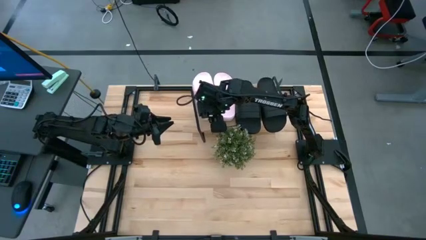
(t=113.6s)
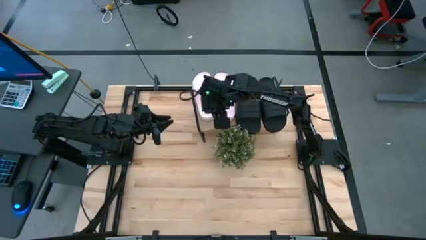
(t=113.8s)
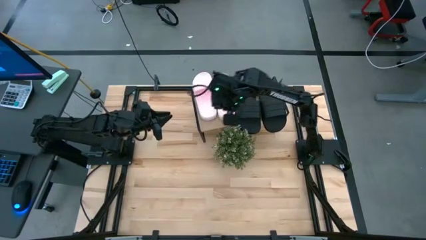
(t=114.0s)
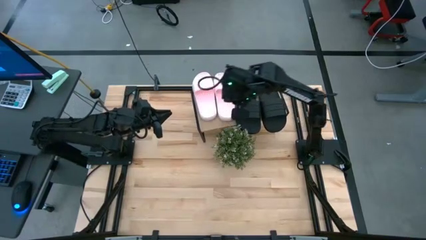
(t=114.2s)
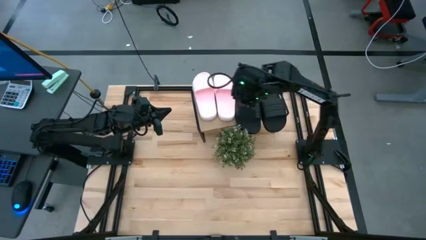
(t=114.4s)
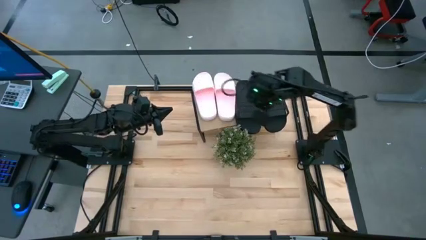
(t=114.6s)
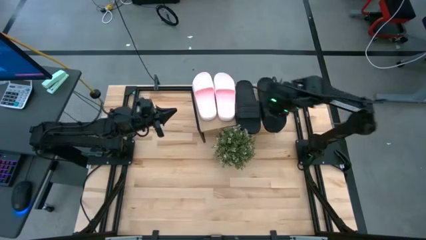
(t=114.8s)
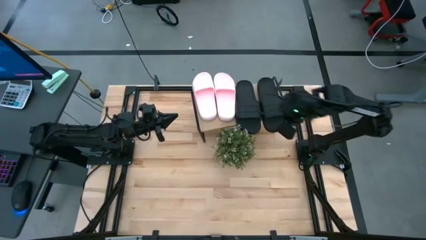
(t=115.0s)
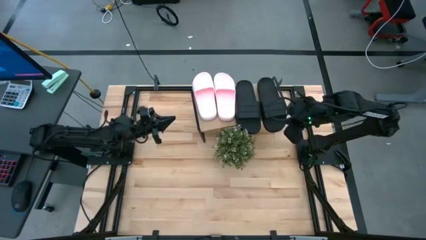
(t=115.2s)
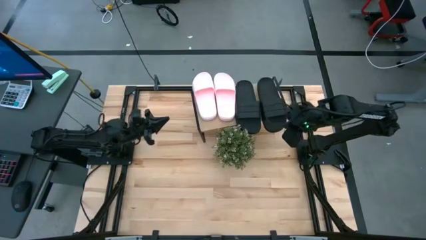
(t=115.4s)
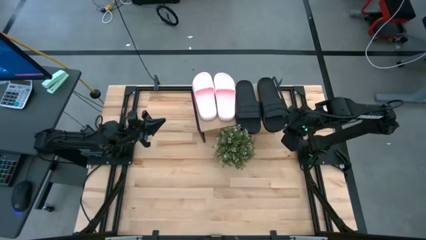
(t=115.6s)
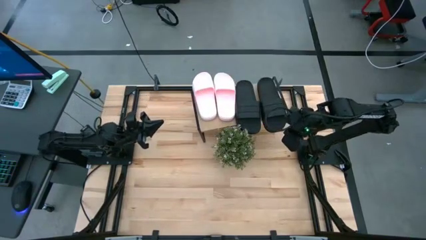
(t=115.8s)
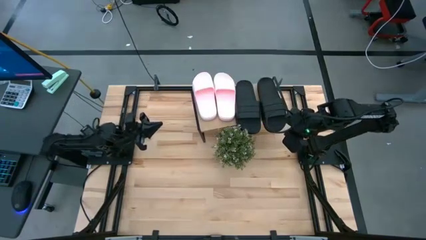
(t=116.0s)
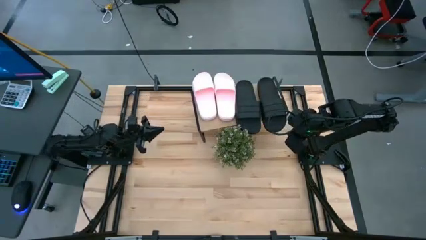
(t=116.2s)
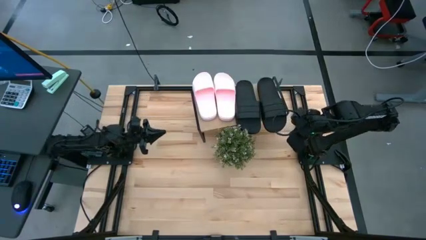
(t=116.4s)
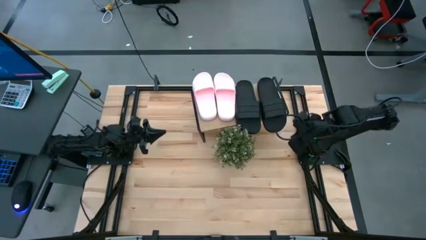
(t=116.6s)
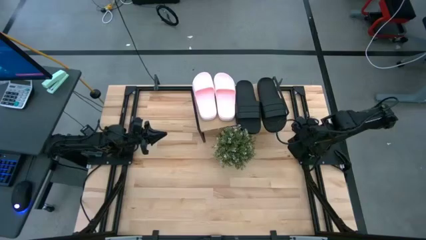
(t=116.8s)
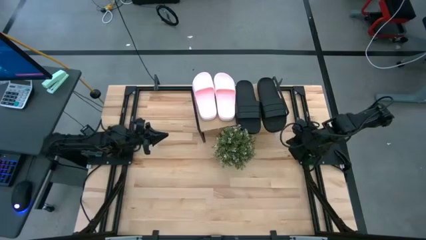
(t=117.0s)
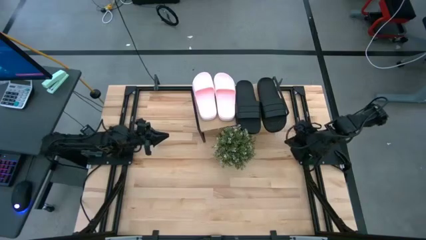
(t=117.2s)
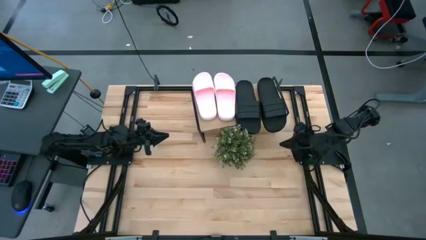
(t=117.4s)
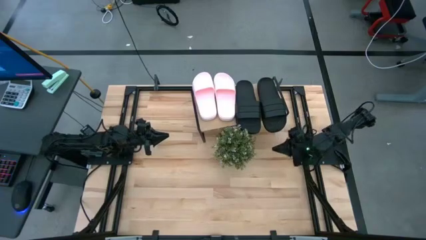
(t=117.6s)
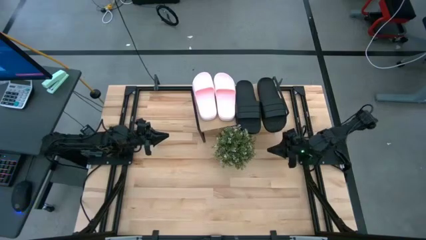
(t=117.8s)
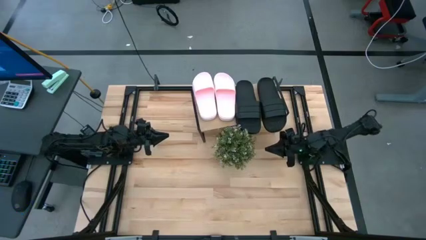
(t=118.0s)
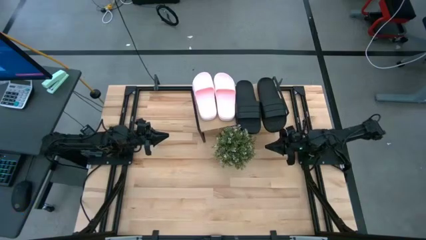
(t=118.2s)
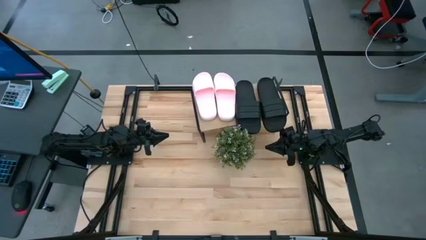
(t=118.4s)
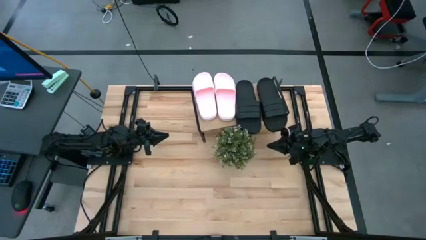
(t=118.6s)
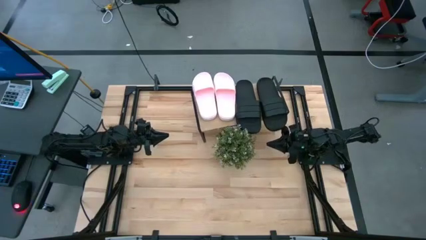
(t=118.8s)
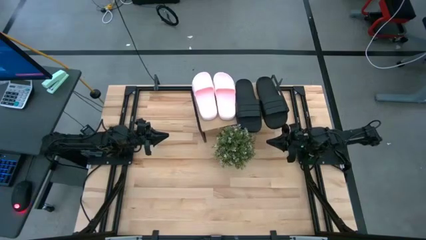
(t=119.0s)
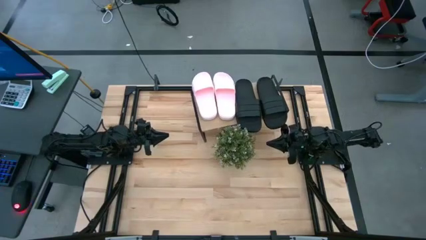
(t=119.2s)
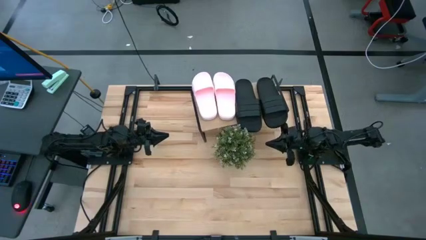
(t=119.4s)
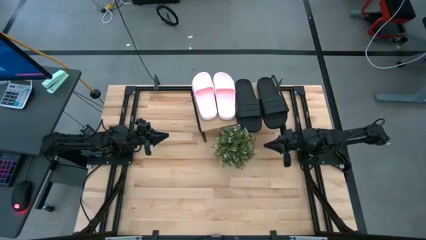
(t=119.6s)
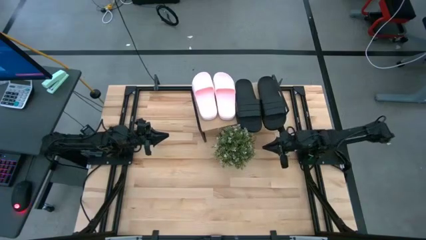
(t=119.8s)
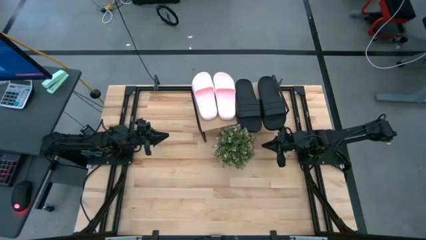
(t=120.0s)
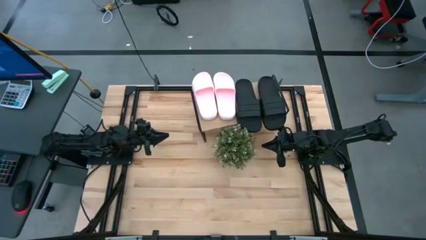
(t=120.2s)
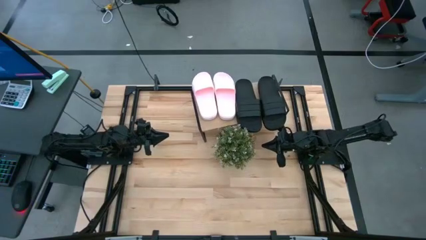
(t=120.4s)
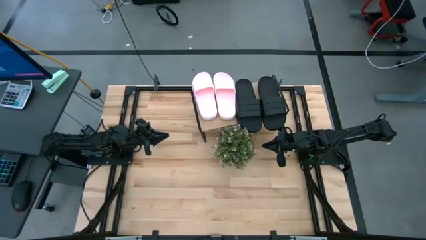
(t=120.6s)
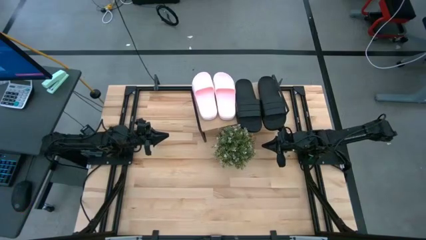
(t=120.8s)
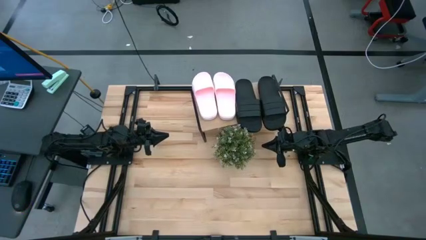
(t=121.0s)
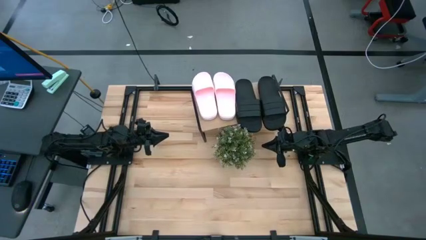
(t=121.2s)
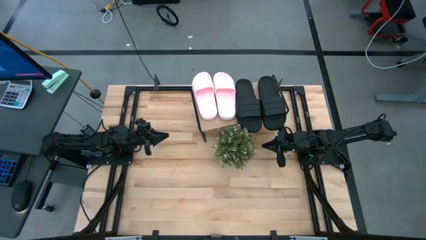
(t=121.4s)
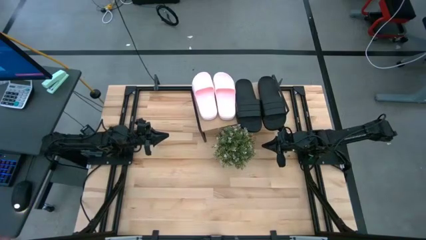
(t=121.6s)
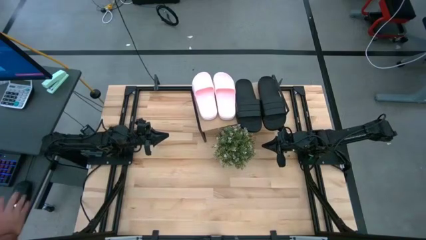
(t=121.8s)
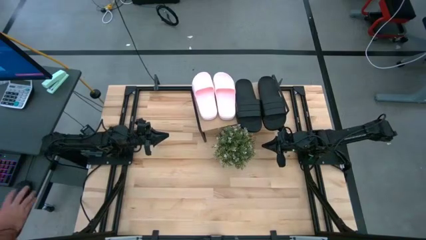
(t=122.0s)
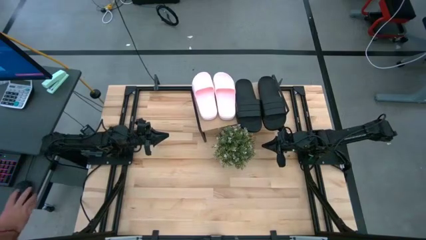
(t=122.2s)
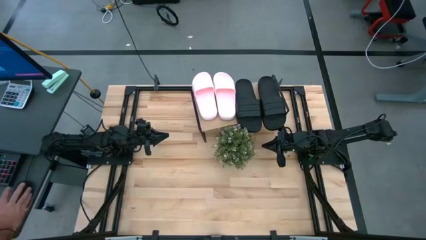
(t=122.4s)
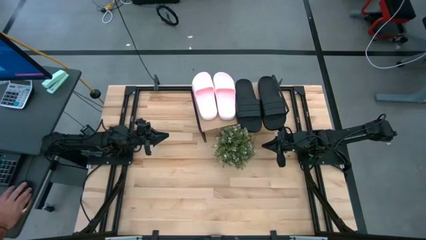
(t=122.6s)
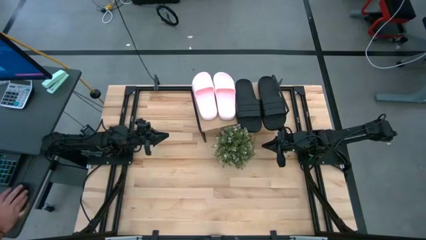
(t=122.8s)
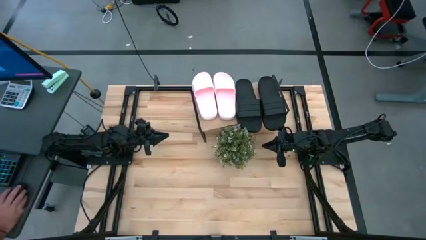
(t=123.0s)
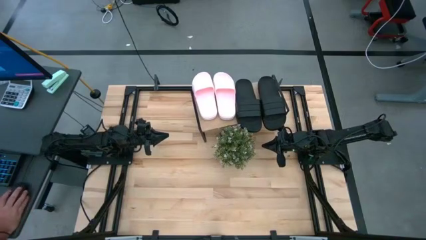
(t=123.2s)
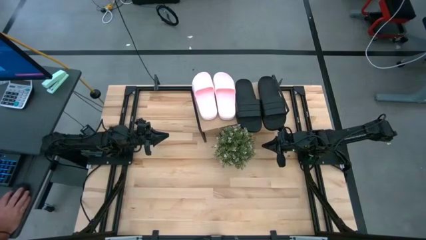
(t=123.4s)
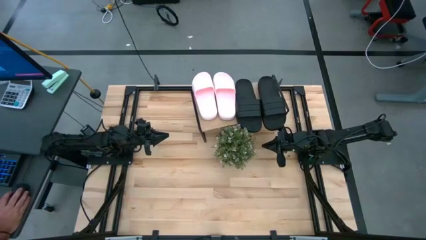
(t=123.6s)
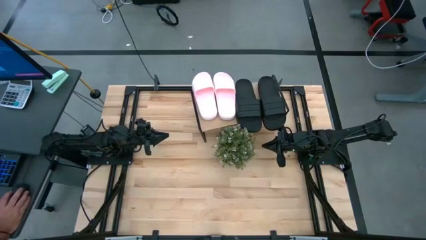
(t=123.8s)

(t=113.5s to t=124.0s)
Task: Pick and place slides into the shelf
Return to Home Position
